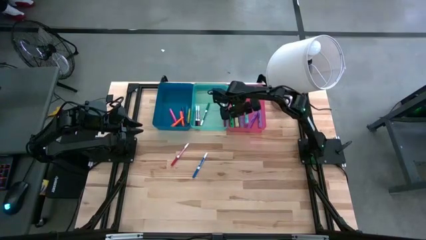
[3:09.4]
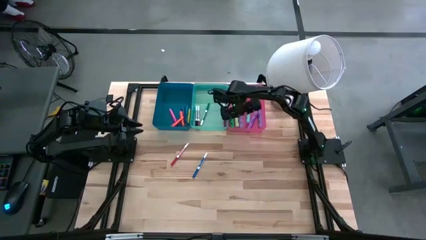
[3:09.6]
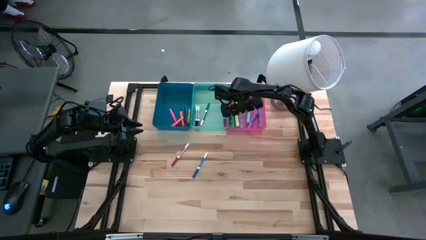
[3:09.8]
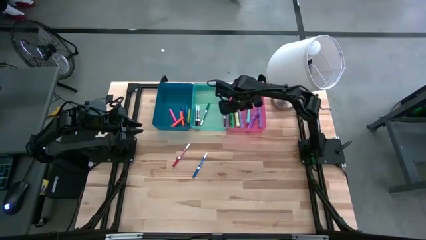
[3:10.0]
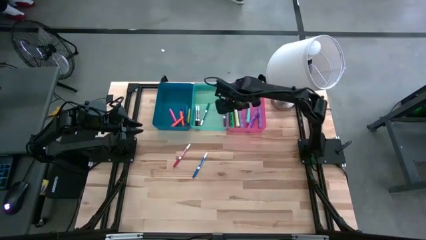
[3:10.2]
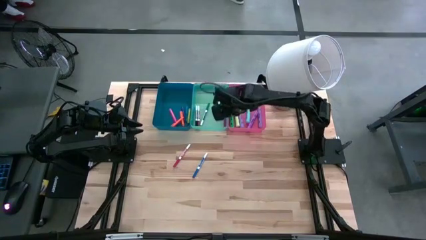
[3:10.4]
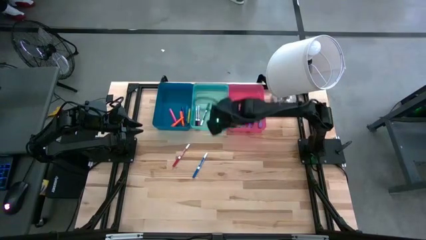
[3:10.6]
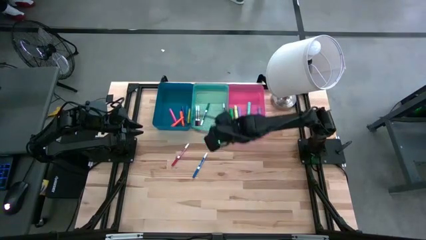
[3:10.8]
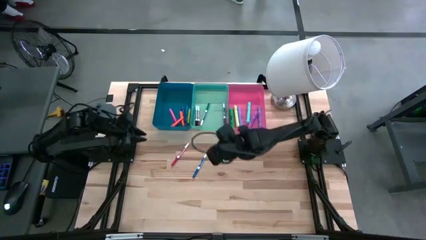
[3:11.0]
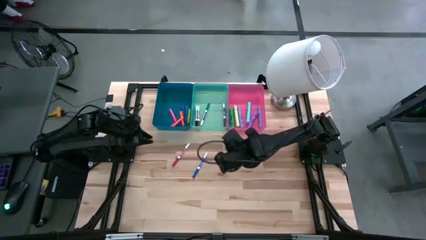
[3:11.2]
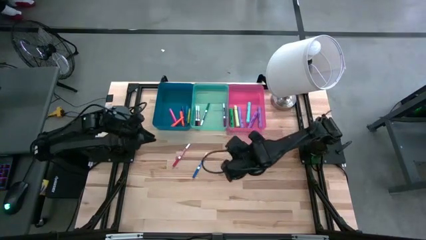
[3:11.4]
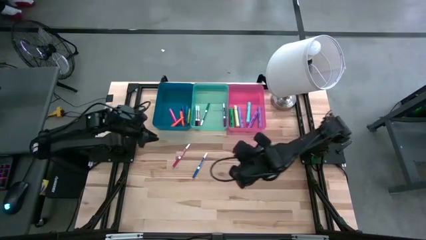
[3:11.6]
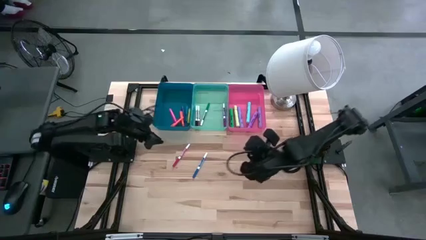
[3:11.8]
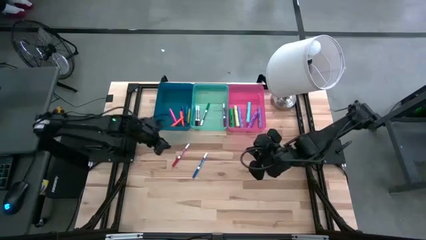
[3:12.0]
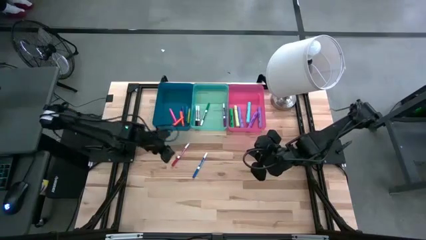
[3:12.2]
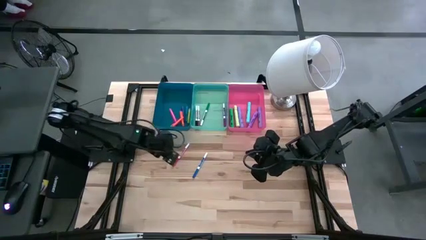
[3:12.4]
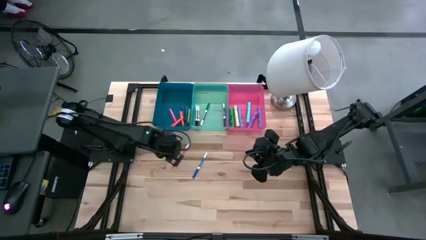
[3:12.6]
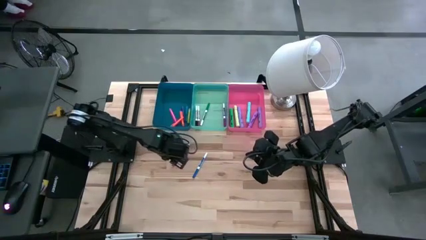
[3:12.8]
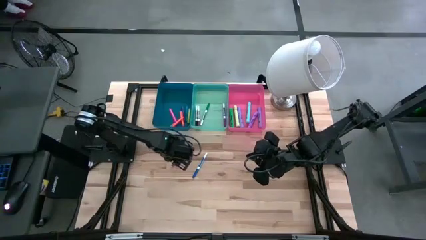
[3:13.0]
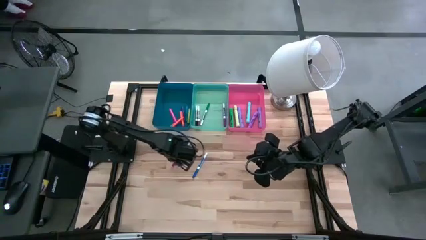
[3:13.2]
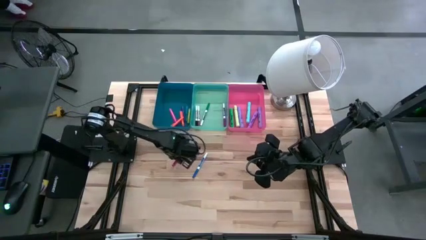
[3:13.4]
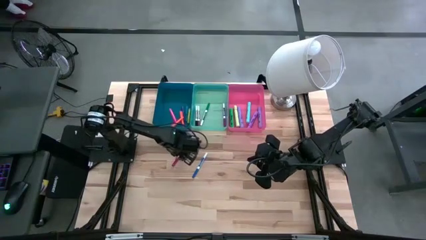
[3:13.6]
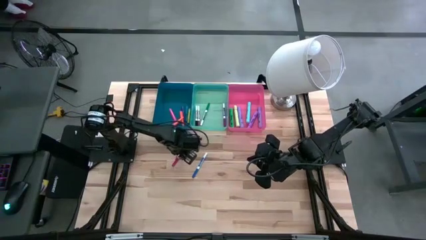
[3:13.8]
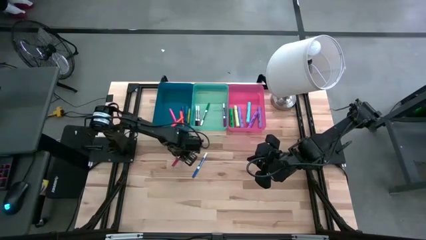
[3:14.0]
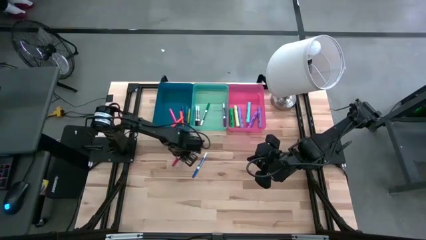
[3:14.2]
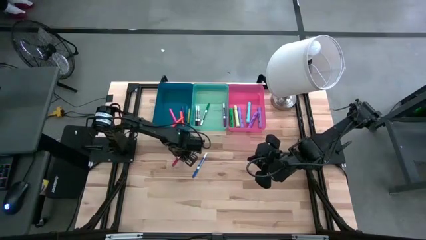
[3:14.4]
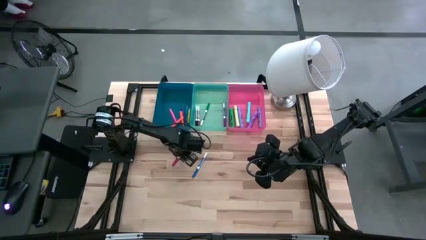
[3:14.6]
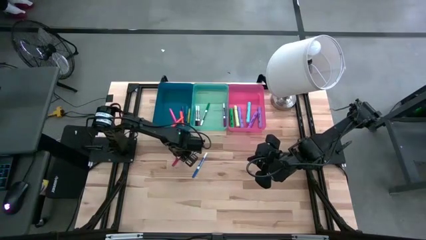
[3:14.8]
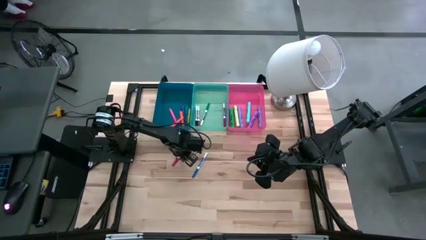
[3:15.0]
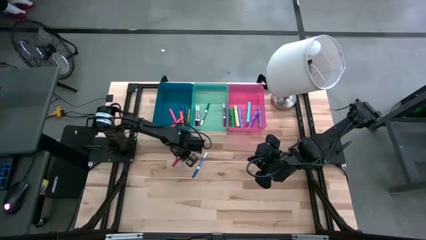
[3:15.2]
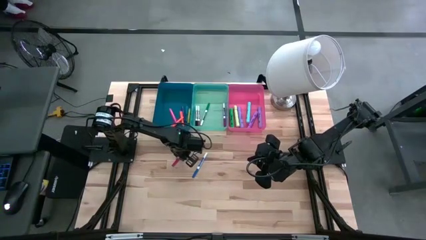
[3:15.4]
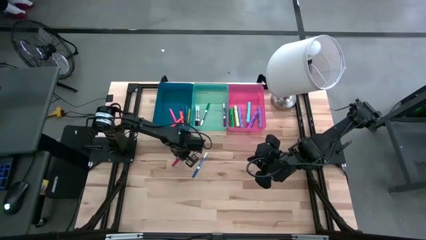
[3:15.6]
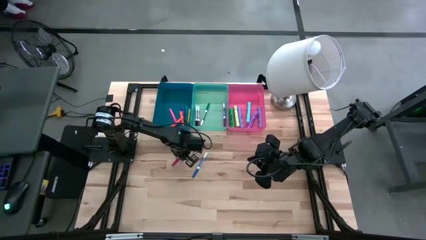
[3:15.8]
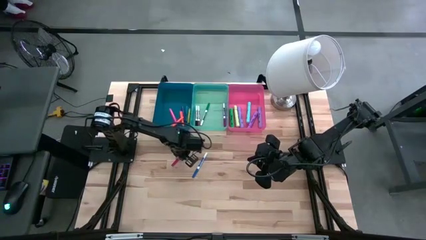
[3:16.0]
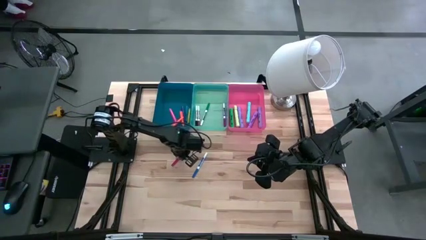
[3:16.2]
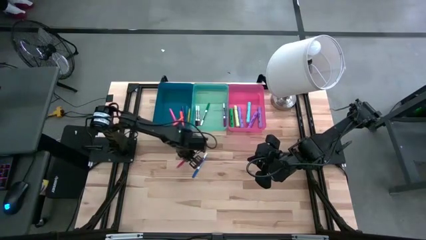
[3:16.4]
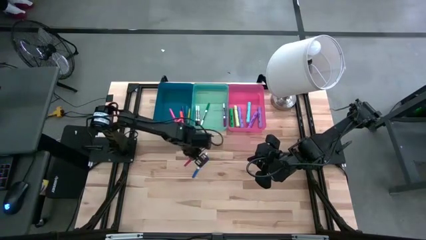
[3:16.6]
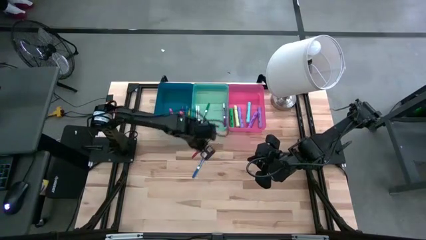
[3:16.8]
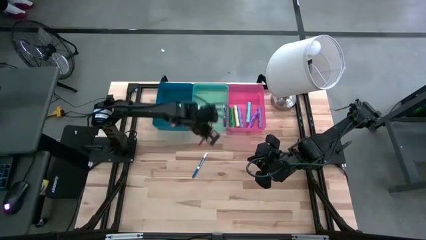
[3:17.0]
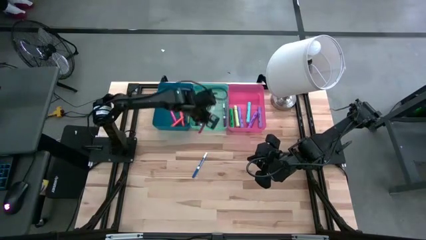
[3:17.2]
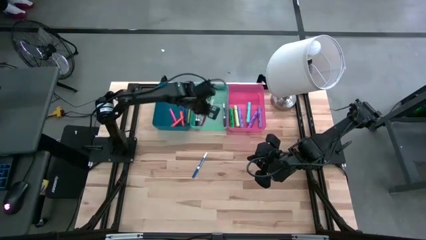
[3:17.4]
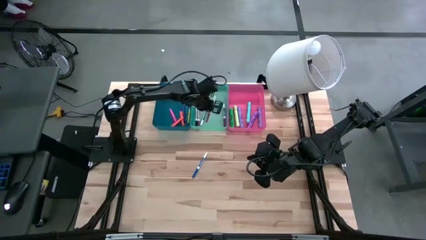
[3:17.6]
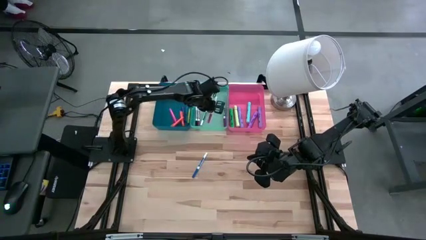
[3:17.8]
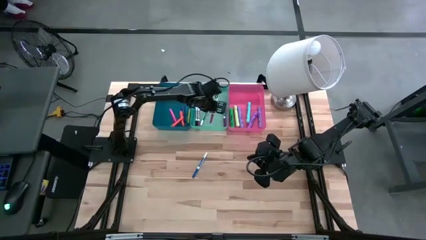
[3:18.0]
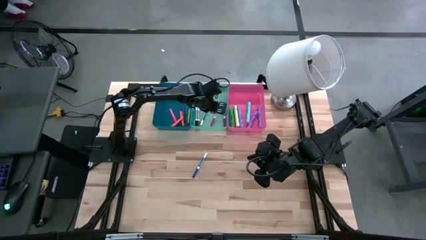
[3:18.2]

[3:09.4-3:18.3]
Task: Pick & Place Markers
Put the red marker pen into the green bin

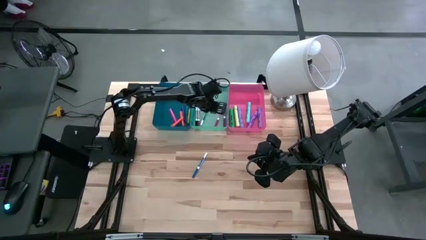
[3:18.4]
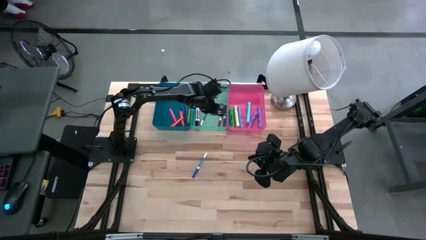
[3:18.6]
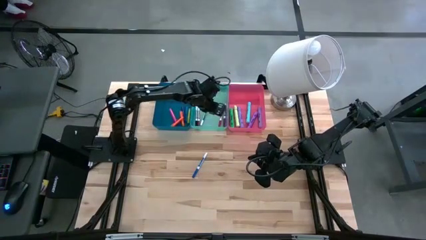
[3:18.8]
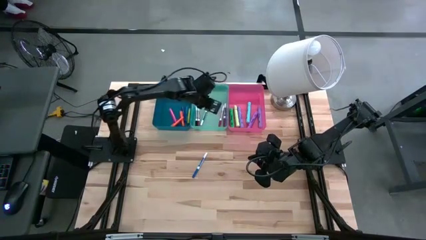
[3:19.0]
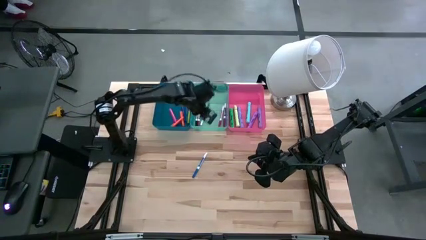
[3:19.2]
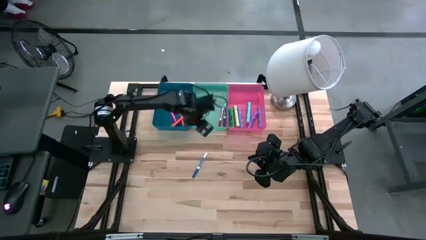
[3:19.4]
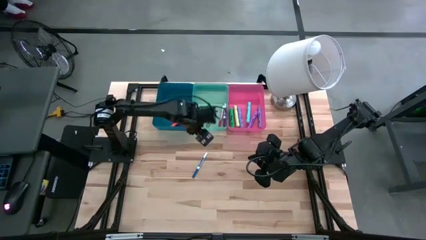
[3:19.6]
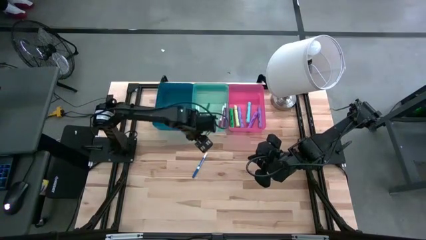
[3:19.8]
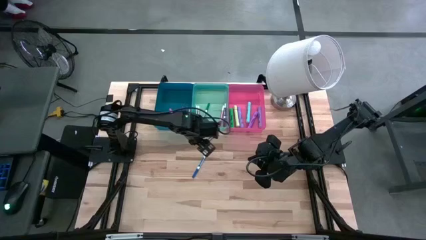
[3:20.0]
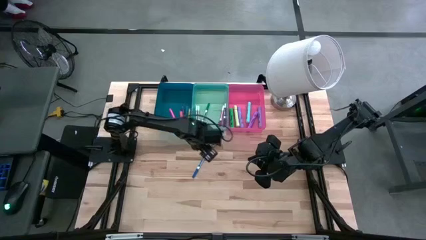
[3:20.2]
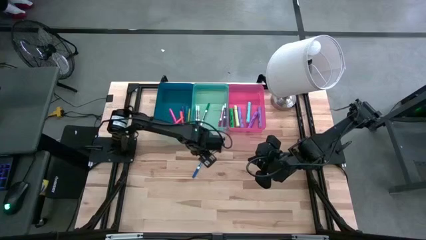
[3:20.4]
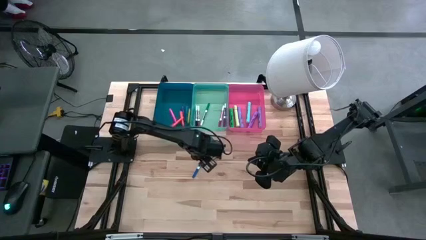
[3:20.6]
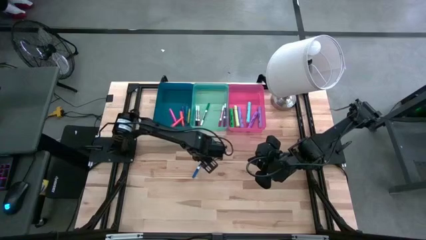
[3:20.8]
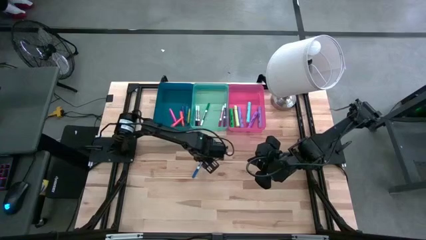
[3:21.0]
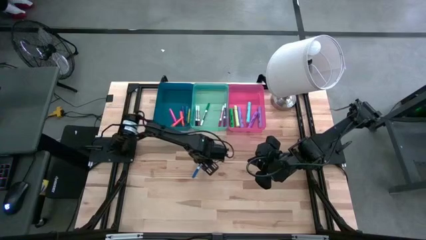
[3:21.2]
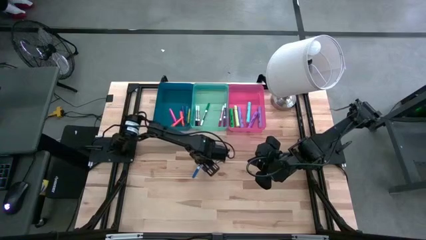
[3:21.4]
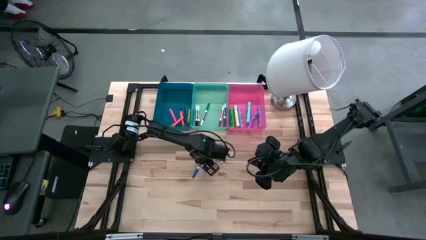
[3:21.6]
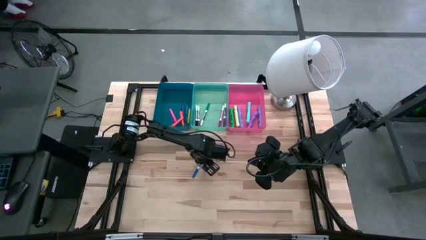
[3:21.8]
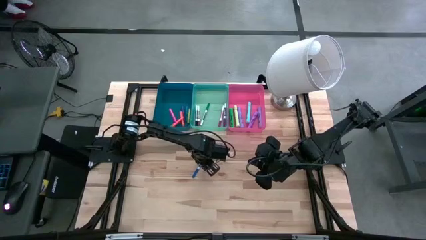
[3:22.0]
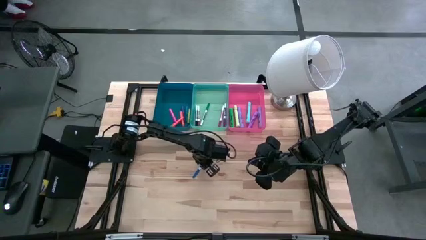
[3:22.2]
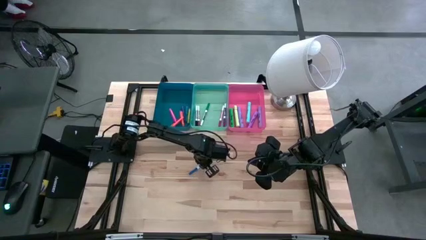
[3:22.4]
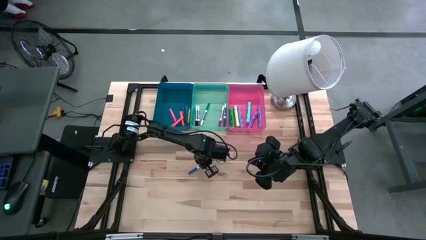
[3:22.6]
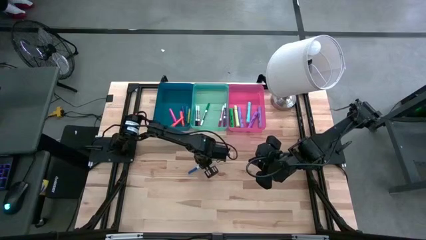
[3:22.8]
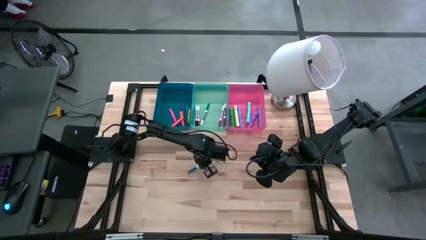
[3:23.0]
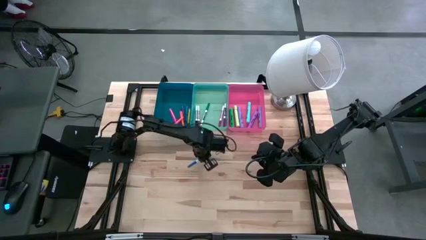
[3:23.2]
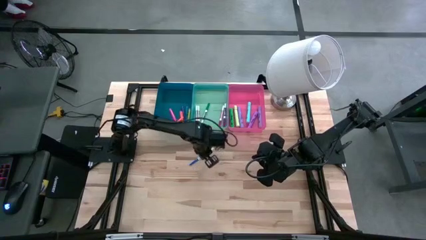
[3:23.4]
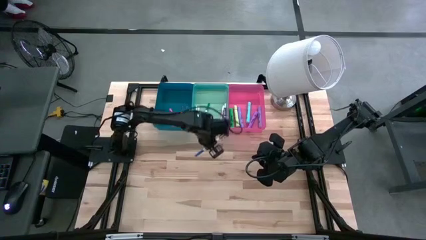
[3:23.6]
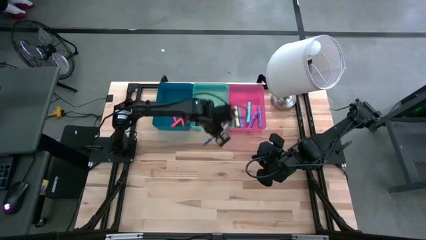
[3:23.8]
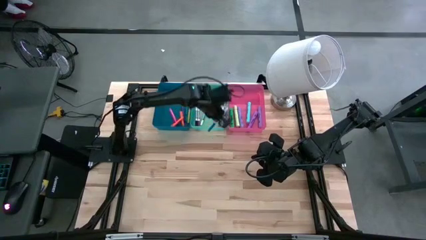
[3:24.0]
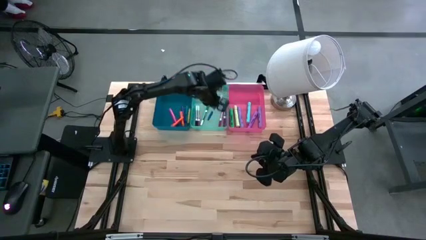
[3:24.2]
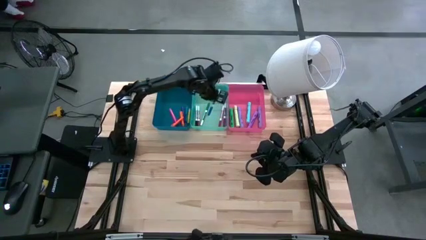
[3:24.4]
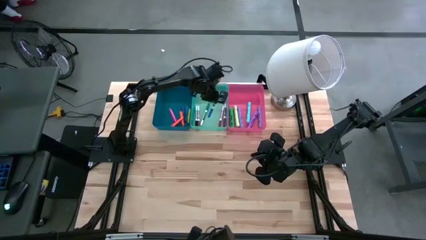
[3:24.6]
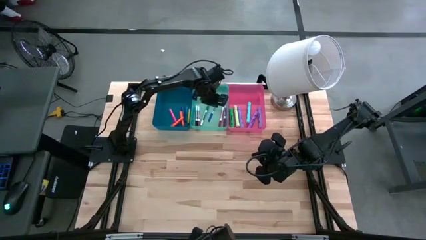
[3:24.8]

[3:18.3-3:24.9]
Put the blue marker pen into the green bin
